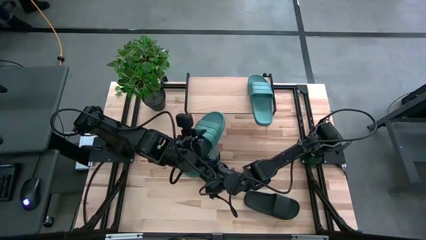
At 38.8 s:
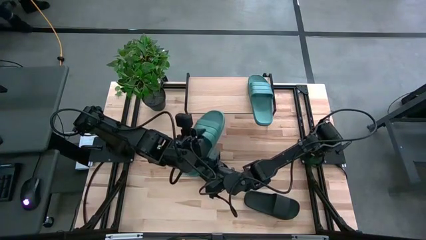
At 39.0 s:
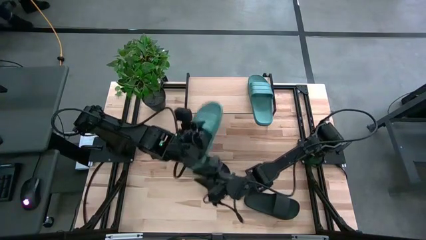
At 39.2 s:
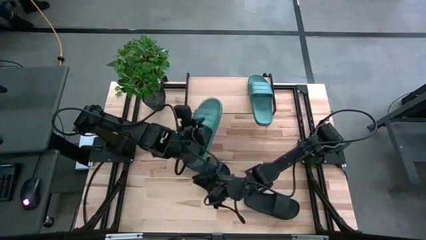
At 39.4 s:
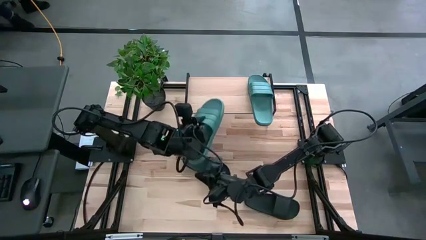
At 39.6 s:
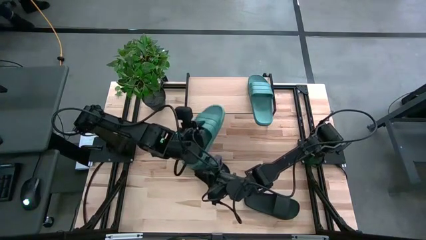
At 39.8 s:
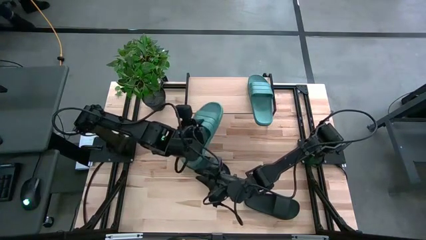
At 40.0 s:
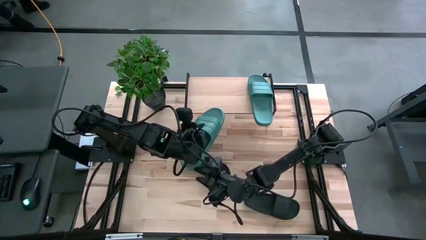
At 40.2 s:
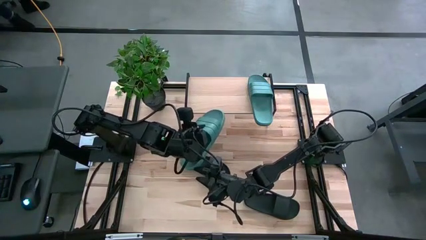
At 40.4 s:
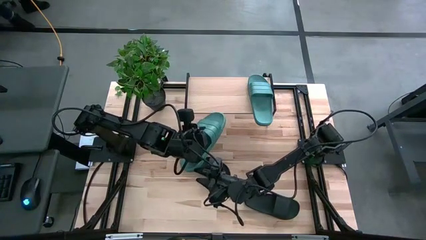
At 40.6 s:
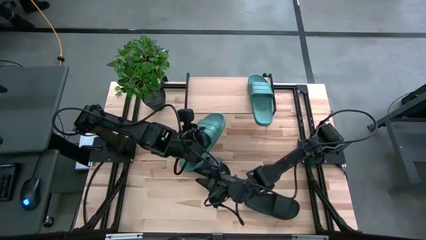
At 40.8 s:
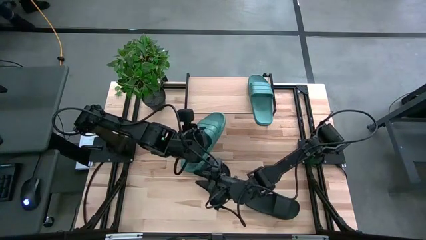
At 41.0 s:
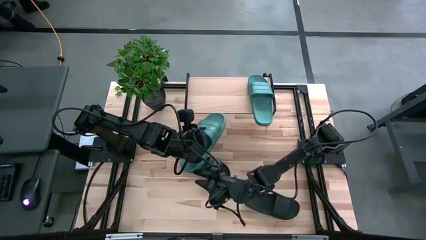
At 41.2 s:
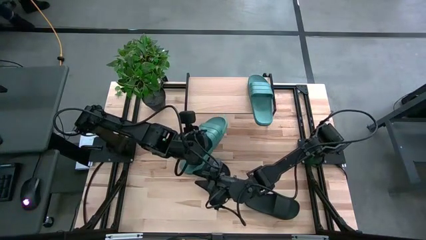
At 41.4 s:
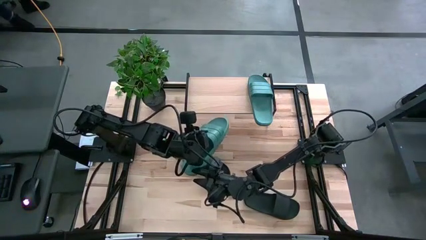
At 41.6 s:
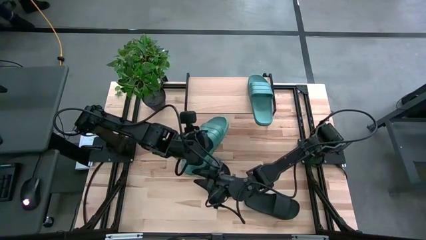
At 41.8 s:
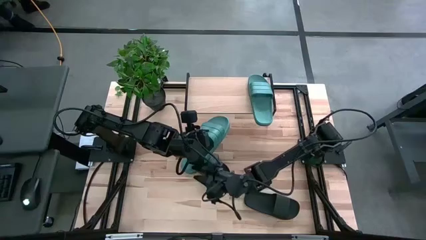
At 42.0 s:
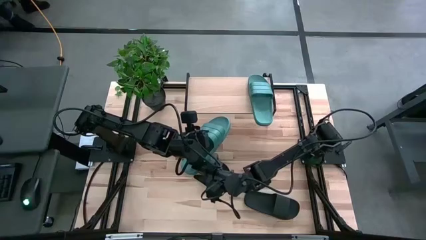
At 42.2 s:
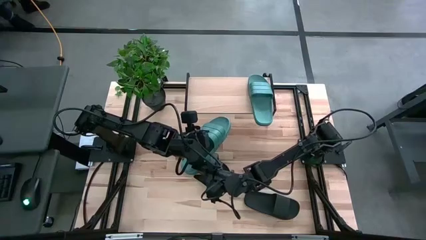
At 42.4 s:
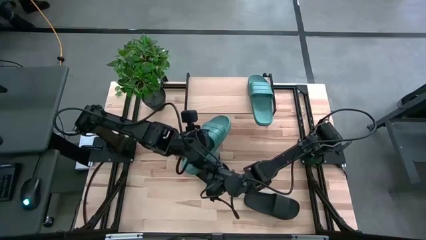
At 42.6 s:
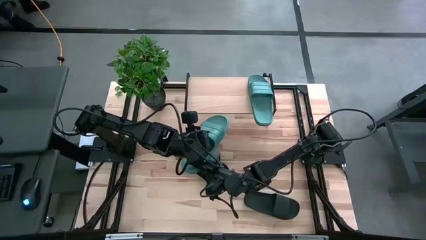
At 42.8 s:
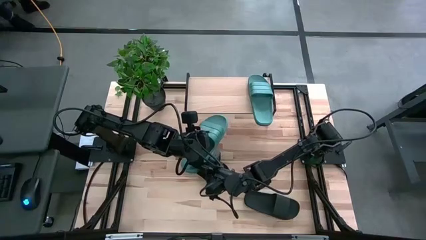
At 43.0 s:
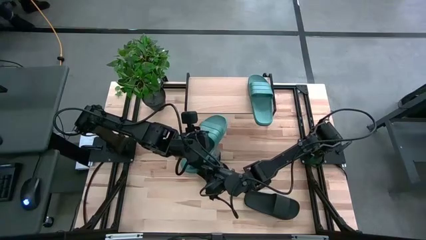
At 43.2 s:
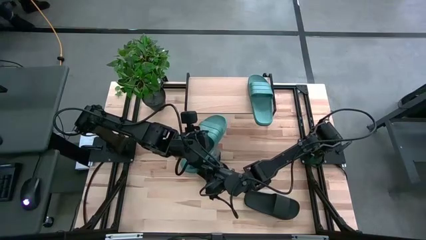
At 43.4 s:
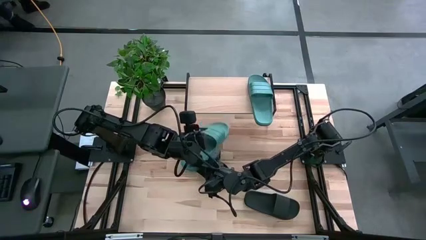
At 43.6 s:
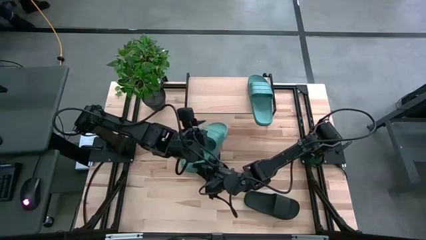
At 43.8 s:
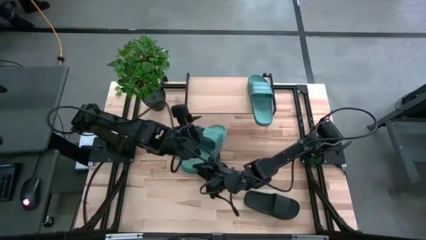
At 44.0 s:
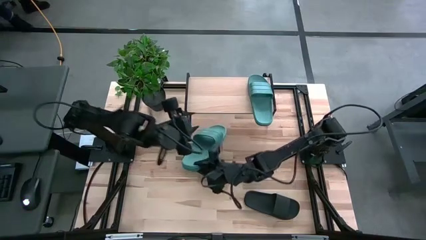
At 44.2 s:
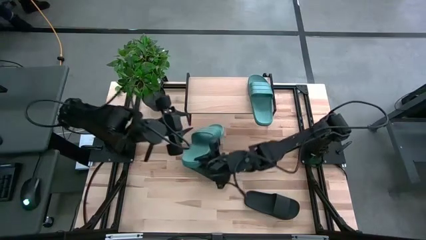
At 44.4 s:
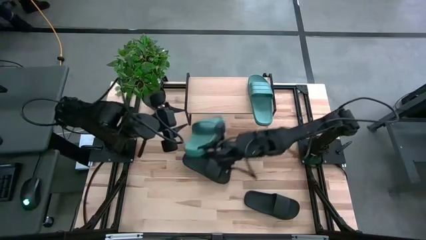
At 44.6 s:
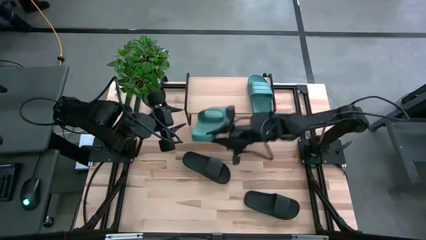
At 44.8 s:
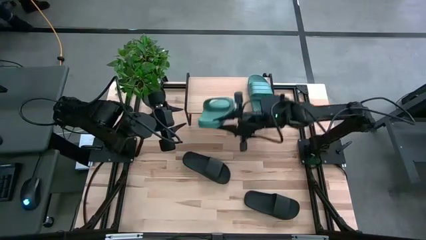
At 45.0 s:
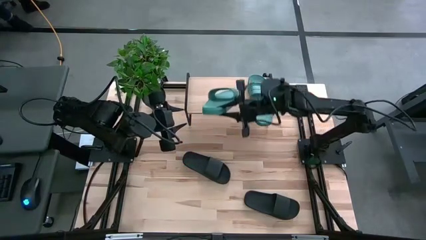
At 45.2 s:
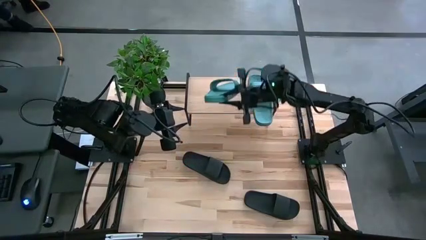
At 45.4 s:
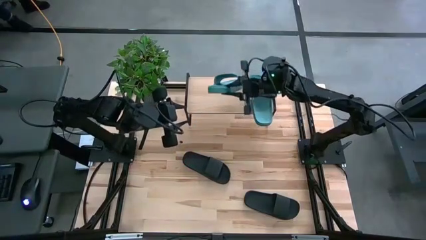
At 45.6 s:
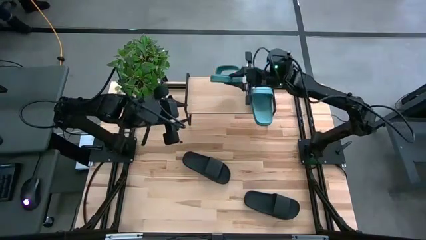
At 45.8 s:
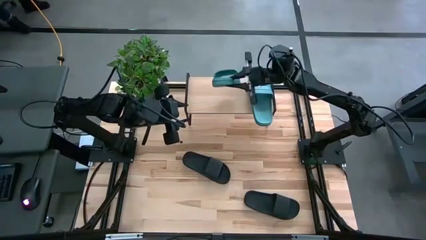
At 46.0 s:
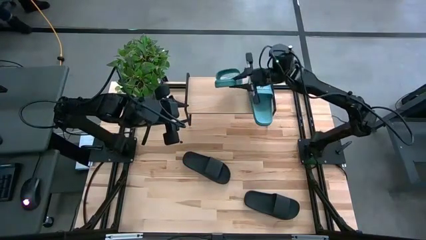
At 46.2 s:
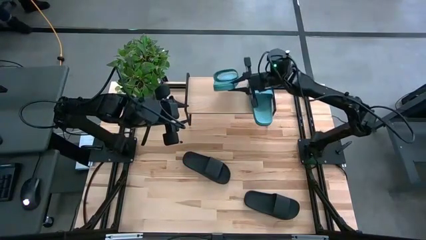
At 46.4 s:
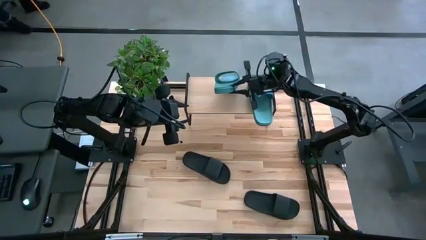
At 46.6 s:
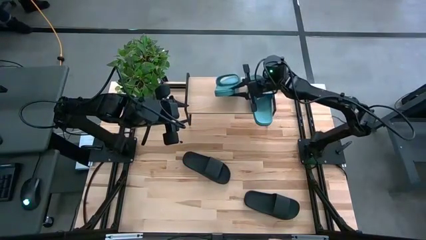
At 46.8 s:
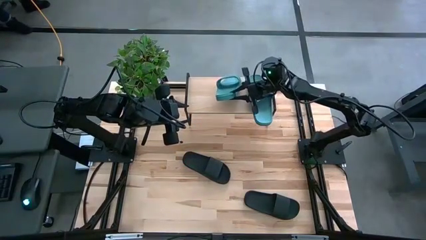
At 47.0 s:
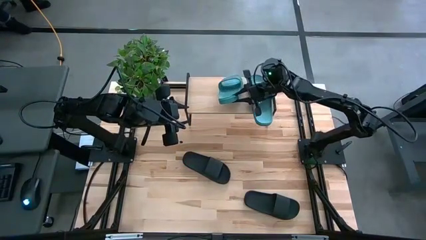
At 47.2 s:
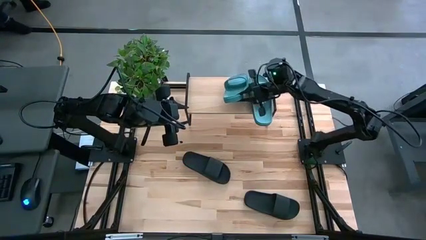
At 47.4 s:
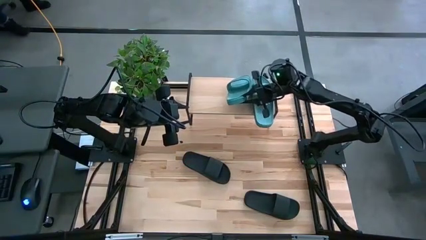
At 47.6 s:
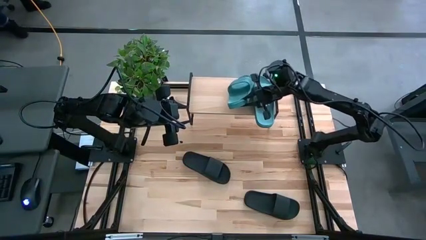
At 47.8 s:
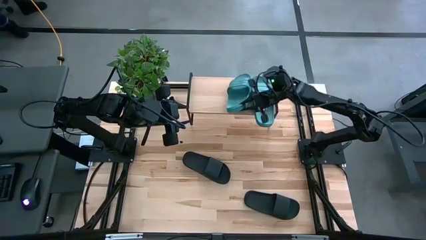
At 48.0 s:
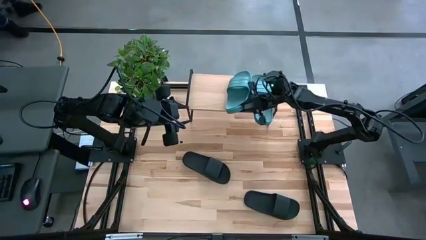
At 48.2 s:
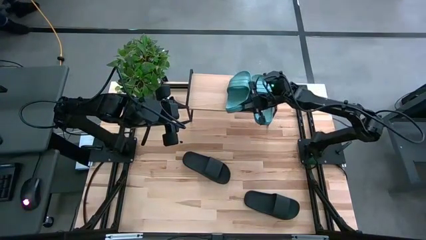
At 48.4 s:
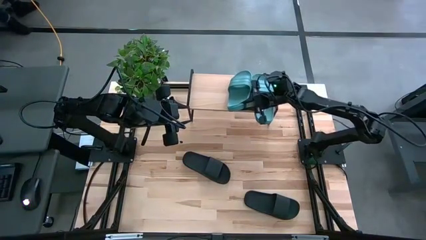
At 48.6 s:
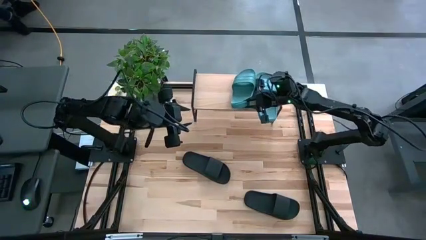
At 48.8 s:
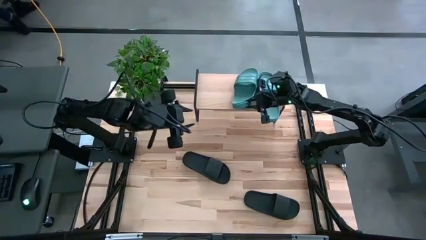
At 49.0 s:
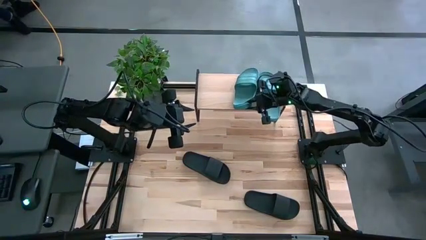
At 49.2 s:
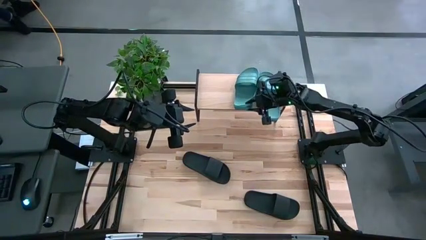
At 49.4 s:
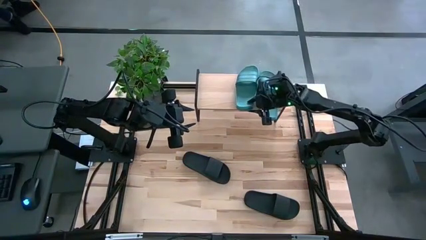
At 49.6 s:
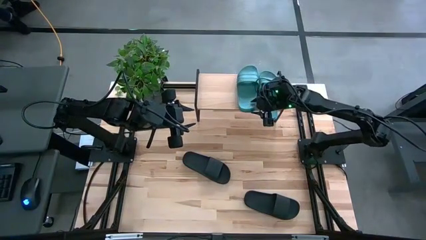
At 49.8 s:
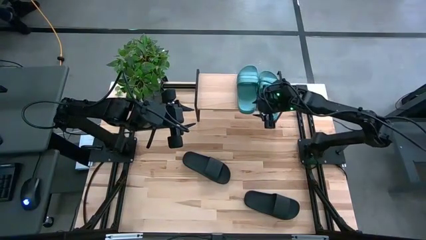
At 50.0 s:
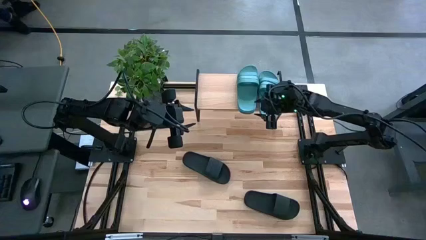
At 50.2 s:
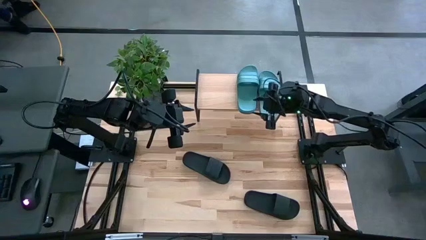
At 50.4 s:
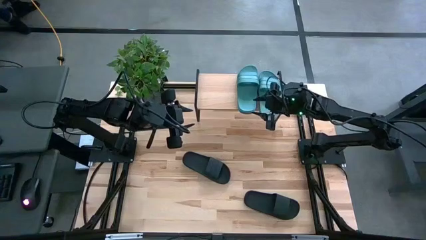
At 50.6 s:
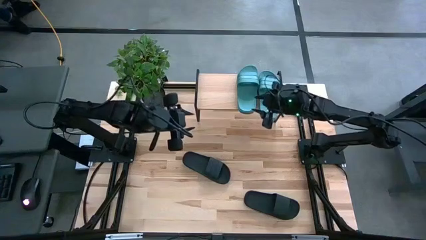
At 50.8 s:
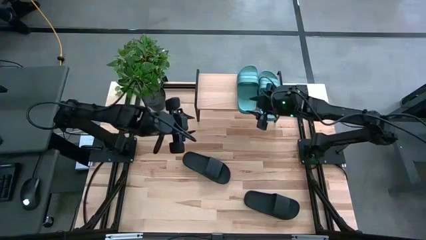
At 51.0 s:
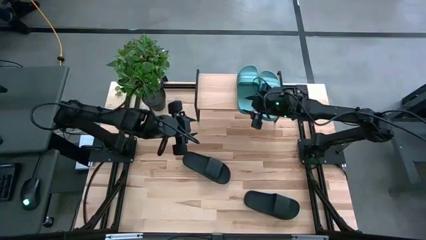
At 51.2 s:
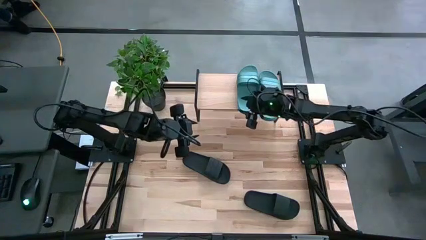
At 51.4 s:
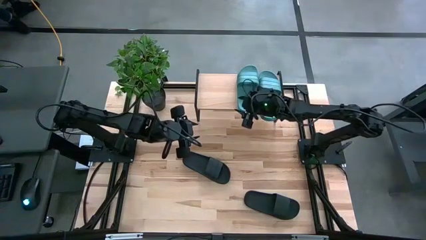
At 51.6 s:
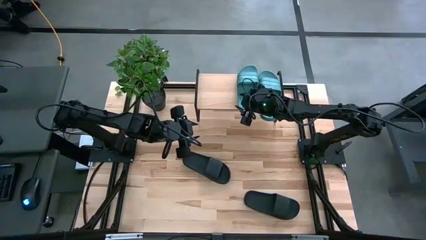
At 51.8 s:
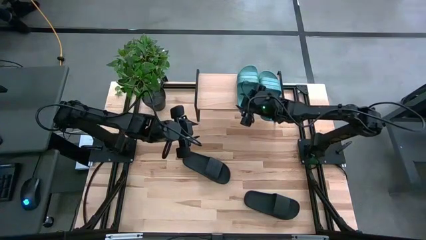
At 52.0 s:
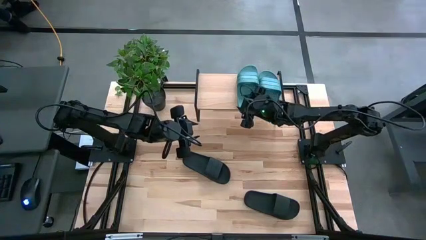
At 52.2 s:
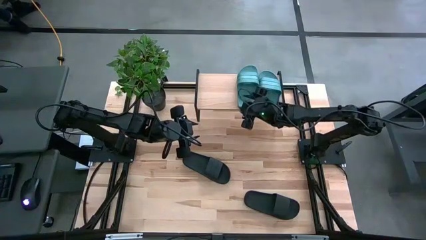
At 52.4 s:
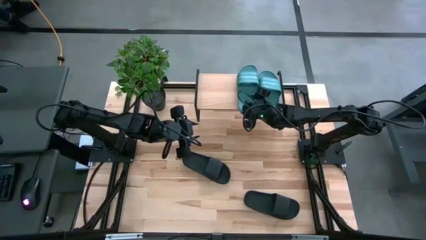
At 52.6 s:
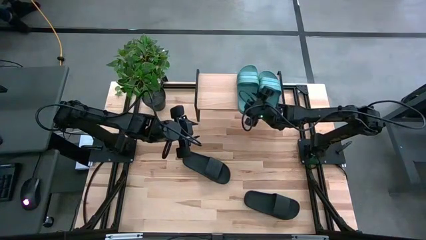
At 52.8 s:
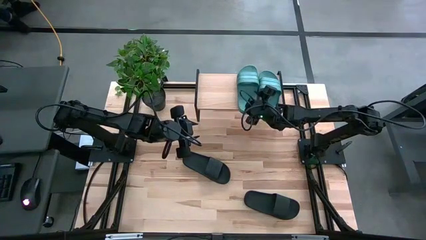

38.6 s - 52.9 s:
Task: Pick and place slides into the shelf
Put the green slide on the shelf
